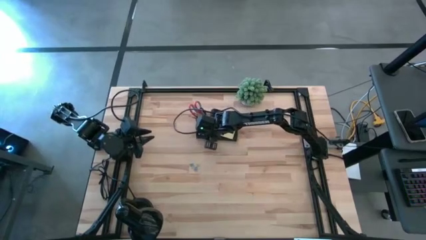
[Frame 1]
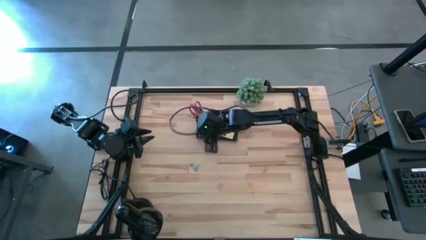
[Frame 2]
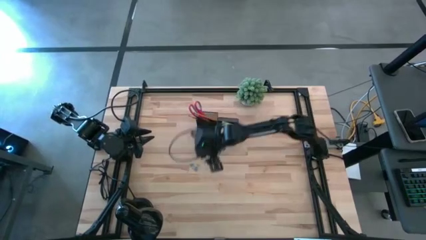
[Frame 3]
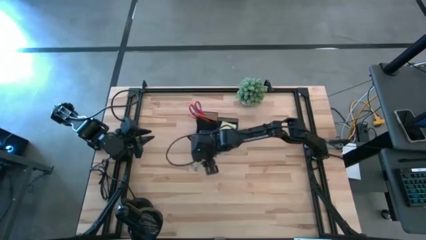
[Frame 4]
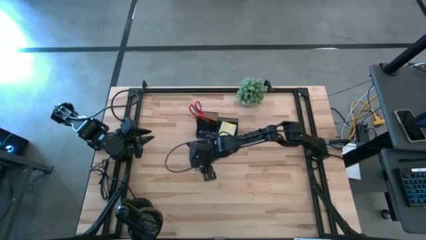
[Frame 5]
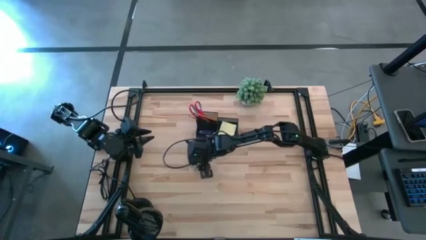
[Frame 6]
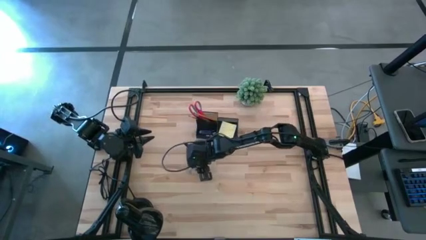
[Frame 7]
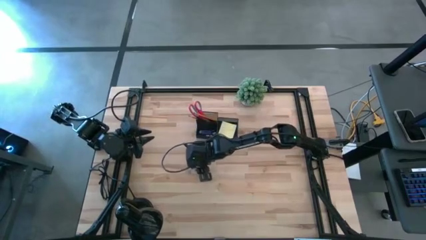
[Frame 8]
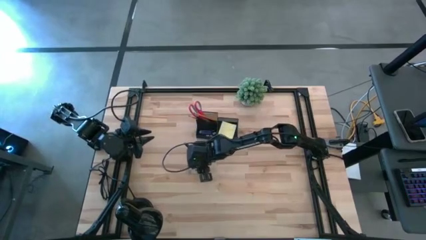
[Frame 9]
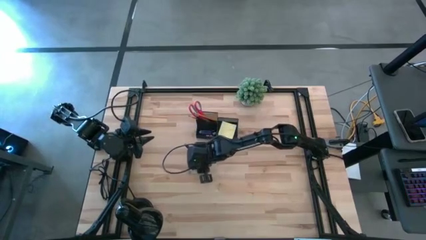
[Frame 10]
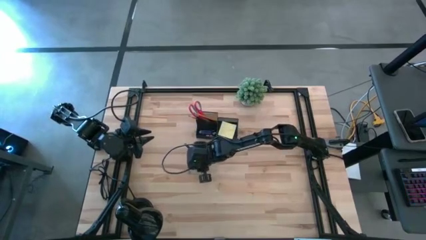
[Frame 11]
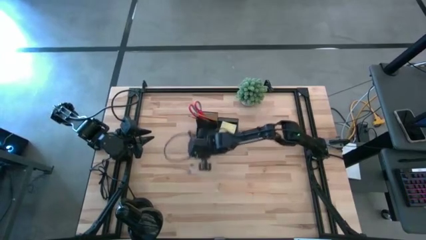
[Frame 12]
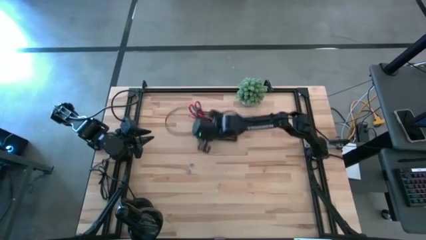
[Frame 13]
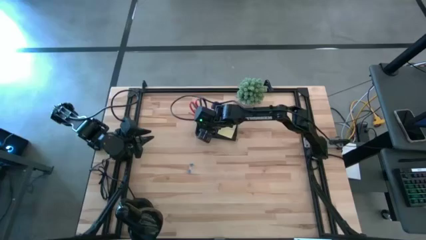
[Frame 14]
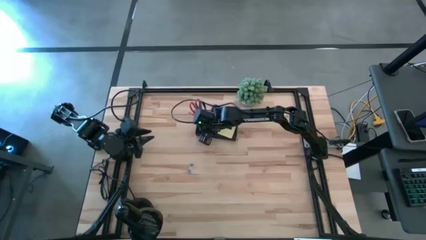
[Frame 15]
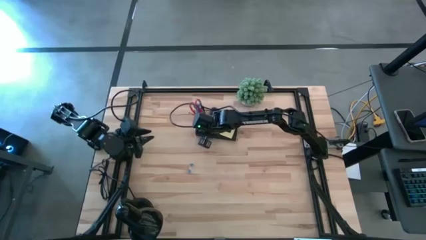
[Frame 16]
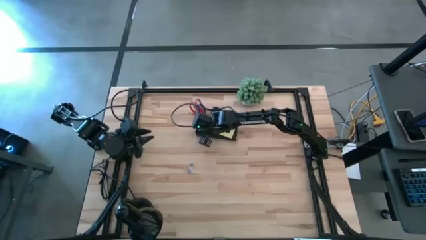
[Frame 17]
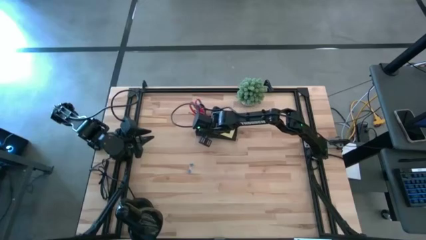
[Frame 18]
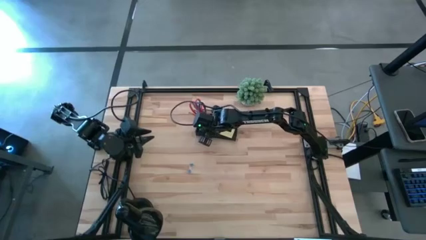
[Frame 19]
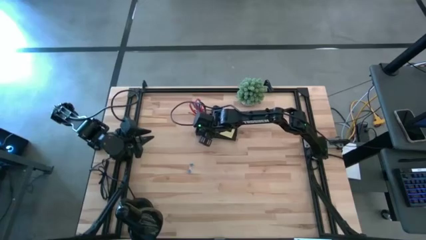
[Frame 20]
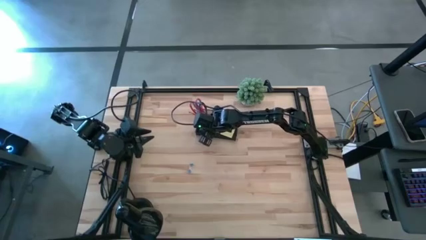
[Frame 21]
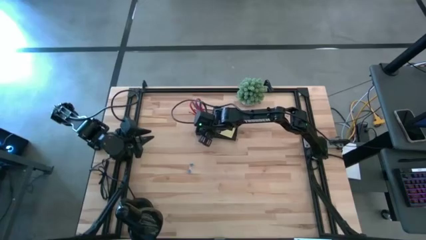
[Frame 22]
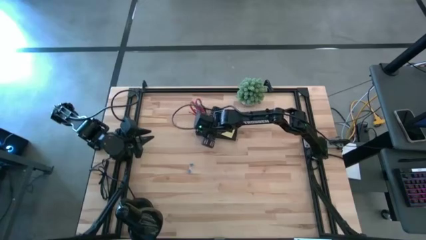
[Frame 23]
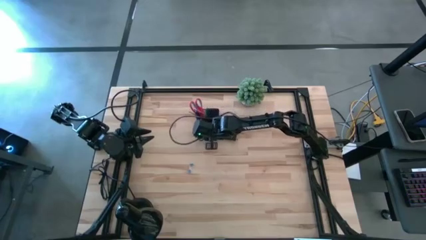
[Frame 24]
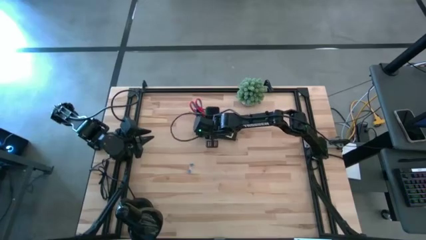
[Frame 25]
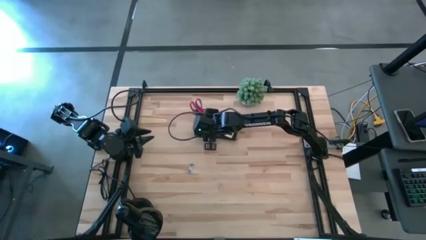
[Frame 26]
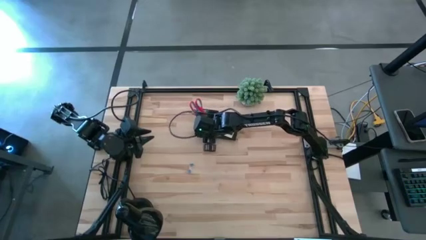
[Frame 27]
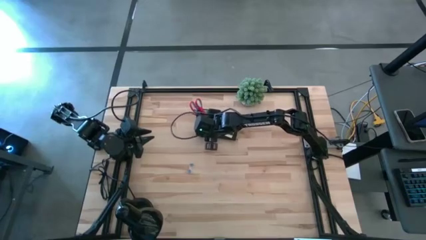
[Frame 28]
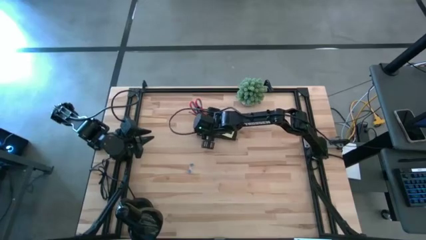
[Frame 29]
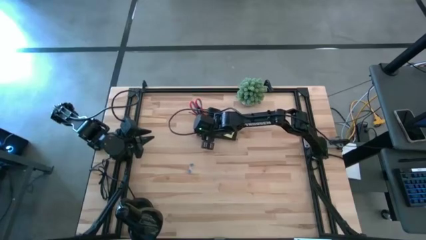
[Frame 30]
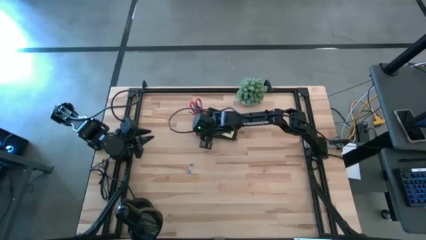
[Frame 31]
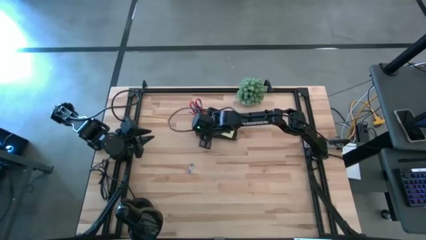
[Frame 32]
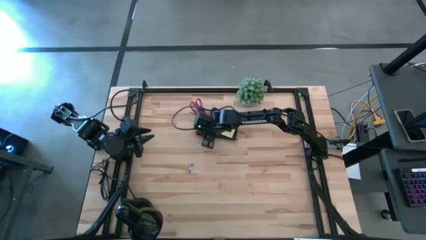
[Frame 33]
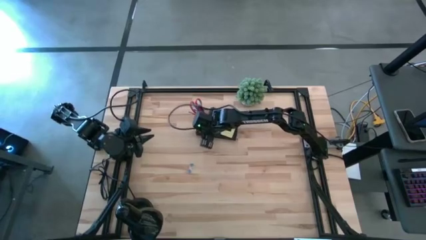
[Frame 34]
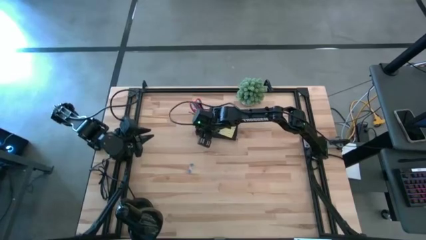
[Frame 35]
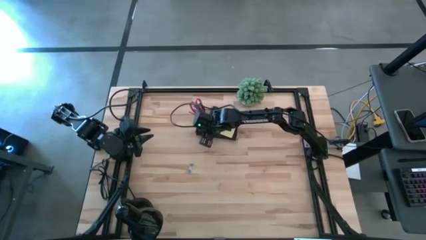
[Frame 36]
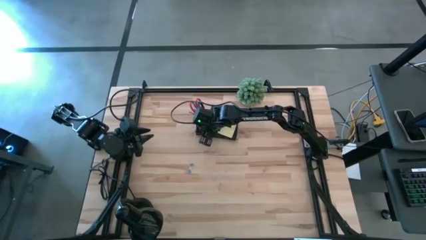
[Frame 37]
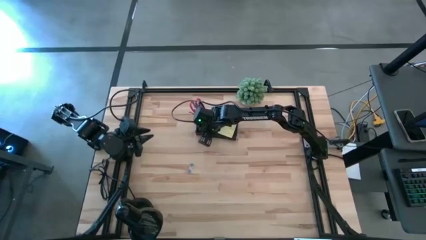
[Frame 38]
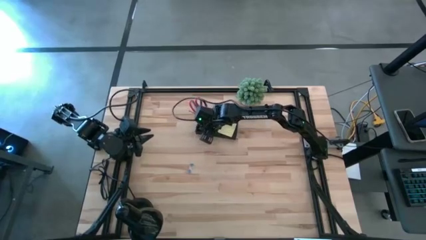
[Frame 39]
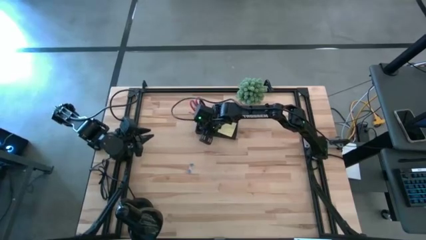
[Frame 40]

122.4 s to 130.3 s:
Task: Pick and place office supplies into organizer
Put the brown binder clip into the desk organizer

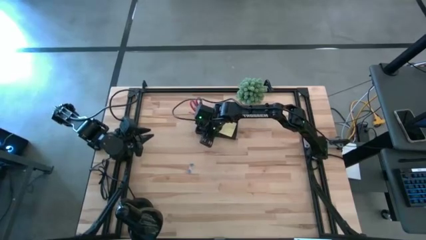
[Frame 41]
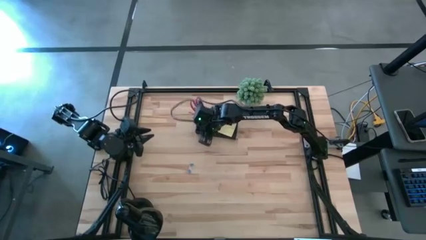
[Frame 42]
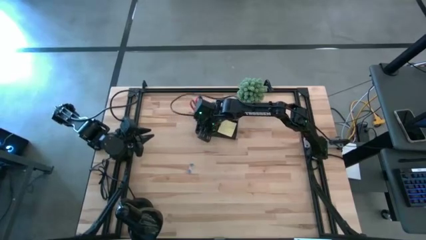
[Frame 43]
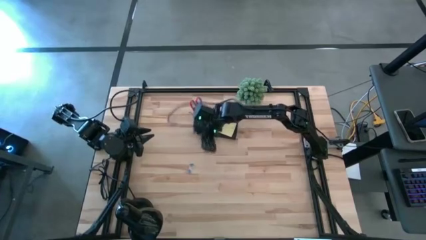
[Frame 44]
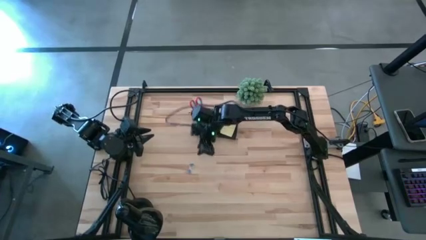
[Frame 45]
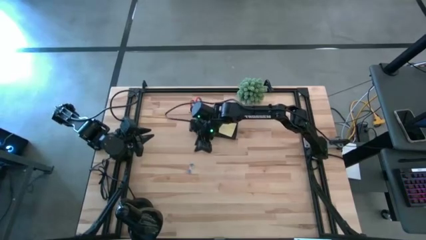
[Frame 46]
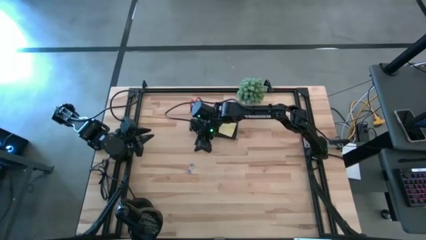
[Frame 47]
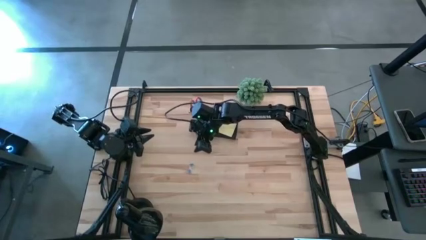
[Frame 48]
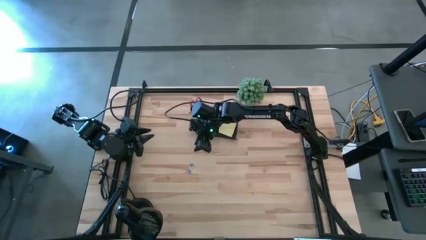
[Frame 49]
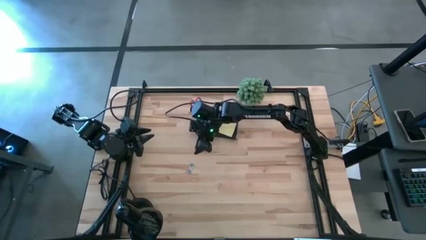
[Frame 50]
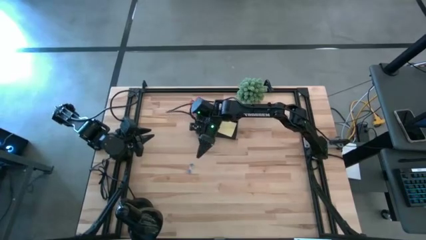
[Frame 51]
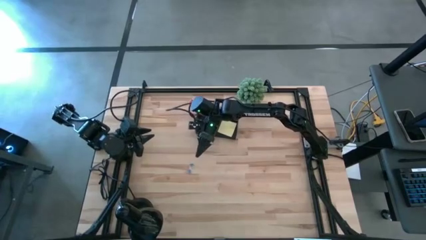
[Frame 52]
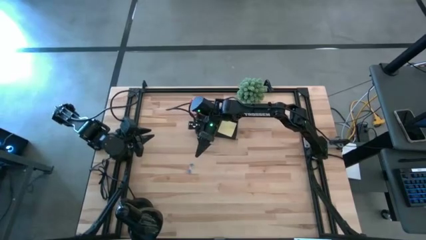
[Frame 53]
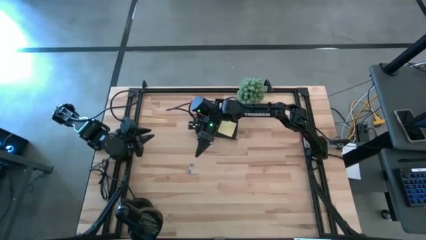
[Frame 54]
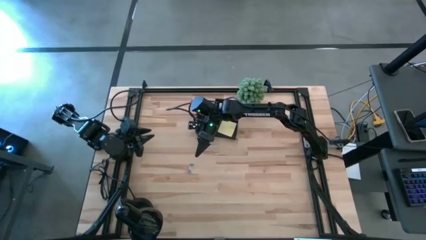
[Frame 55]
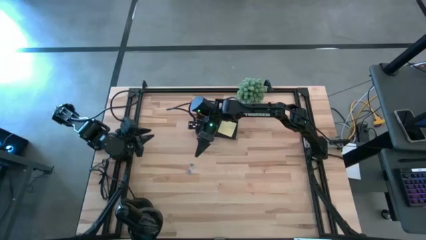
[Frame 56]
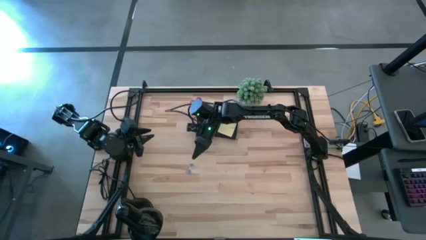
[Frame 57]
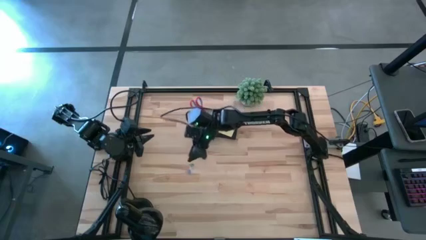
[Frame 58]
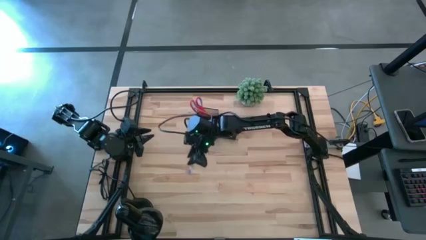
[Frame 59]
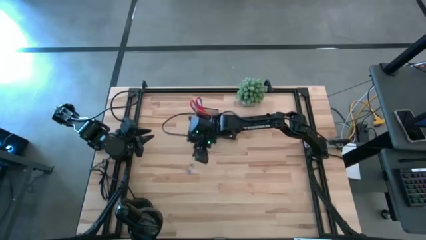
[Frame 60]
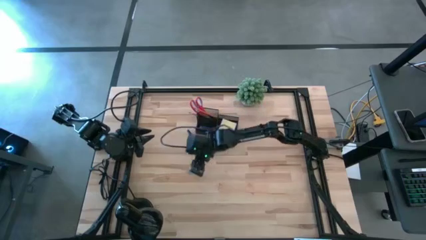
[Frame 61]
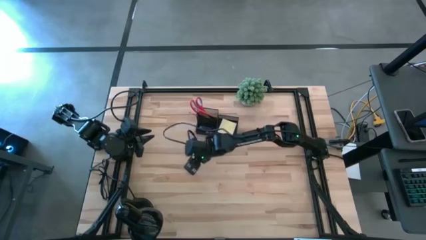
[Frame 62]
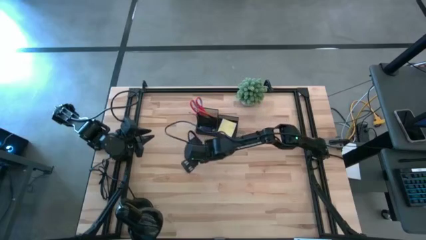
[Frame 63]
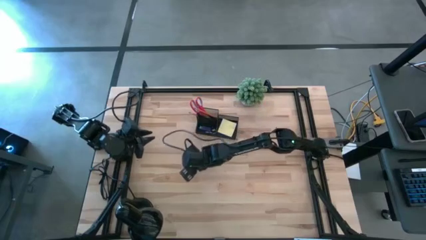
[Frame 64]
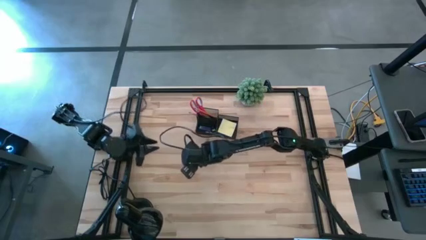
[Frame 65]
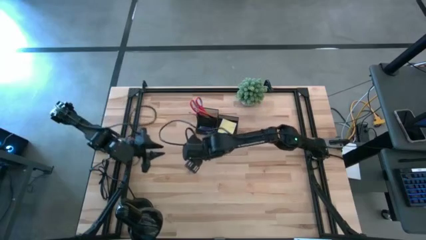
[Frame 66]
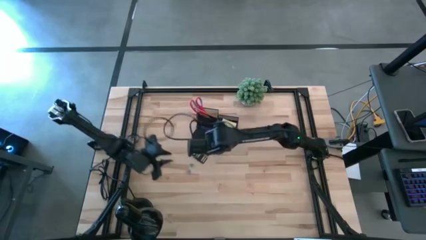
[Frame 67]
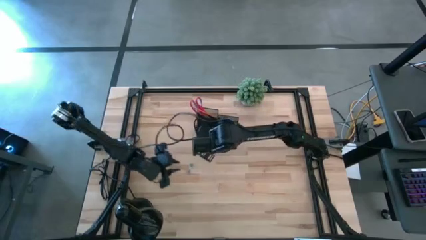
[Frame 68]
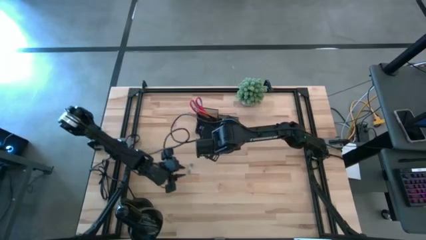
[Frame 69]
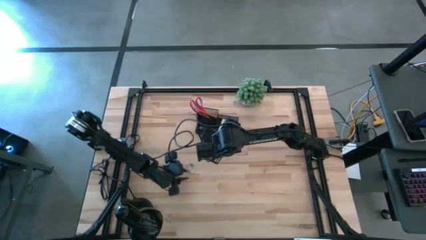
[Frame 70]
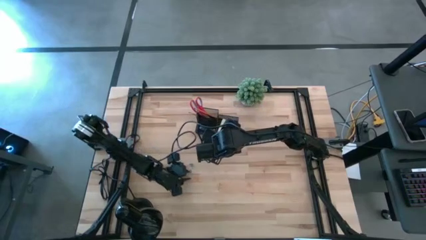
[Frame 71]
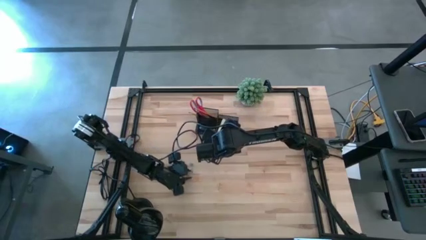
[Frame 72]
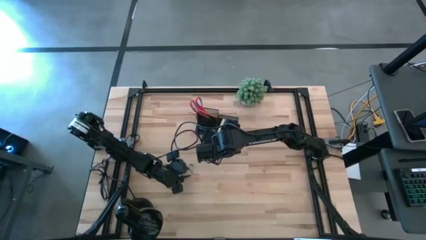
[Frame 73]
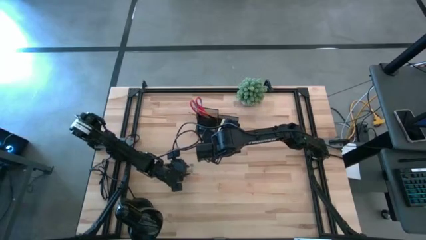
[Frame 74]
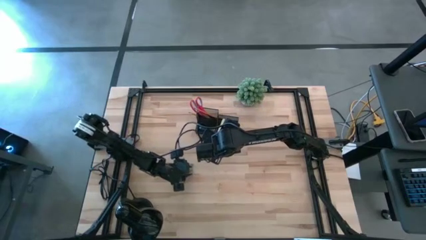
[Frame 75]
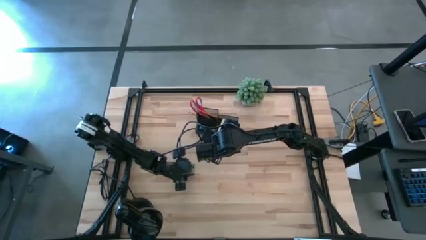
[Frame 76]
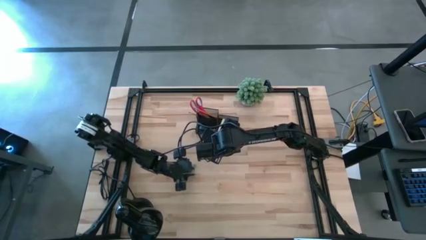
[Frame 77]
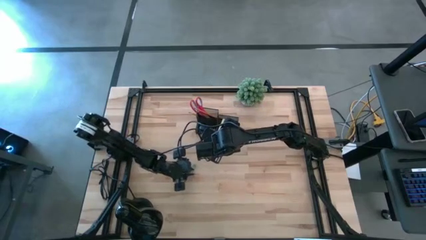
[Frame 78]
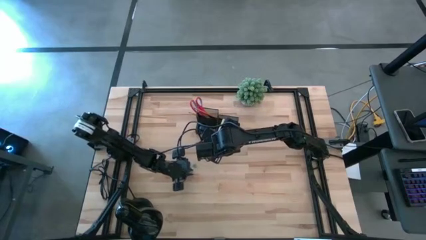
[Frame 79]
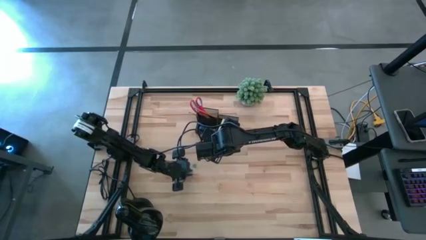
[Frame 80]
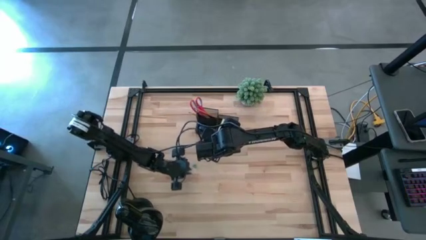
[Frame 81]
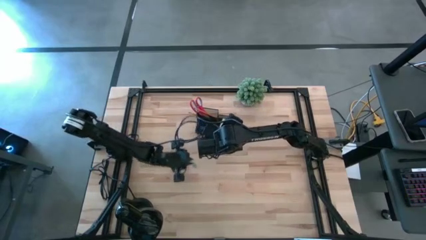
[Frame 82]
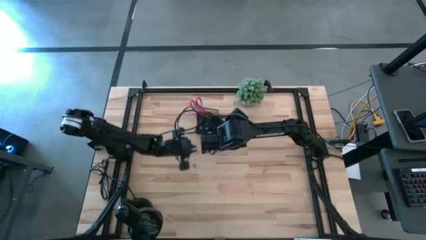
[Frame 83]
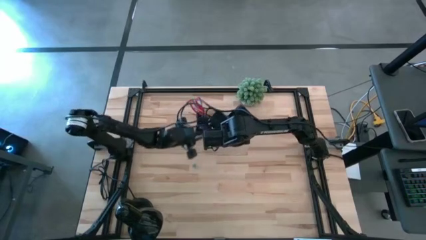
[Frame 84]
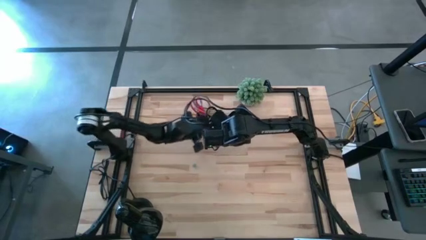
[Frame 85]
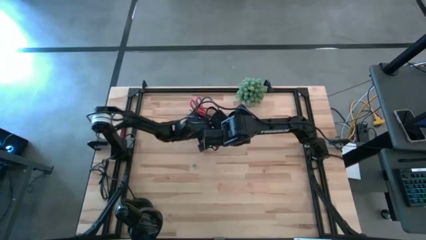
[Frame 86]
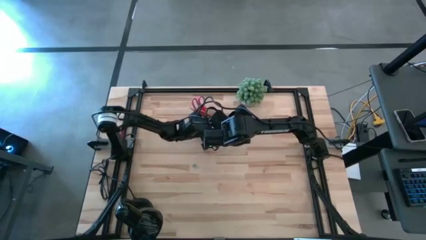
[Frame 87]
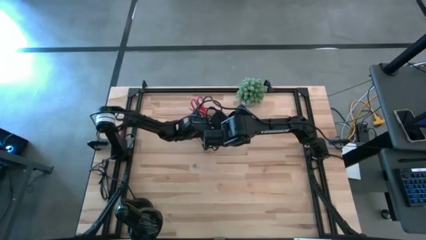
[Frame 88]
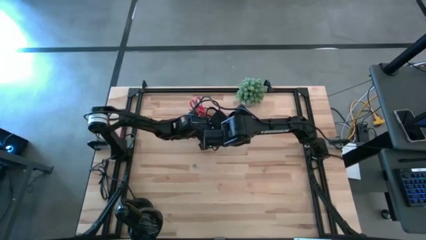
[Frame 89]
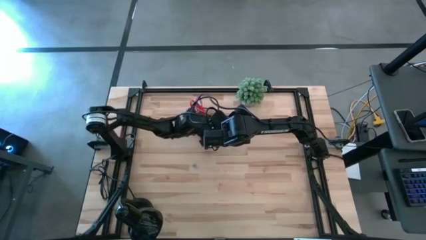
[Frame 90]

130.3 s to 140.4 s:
Put the bottom blue binder clip into the desk organizer
